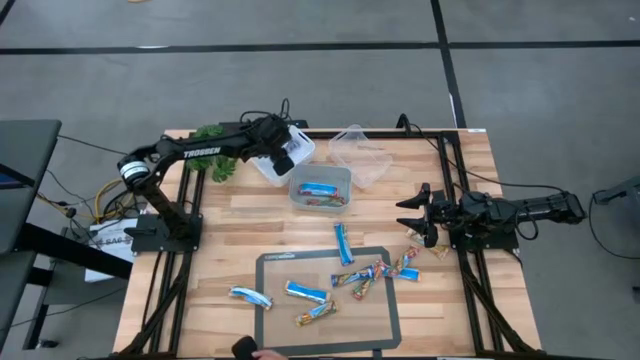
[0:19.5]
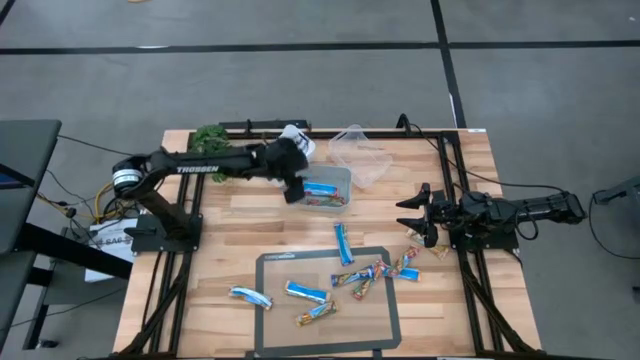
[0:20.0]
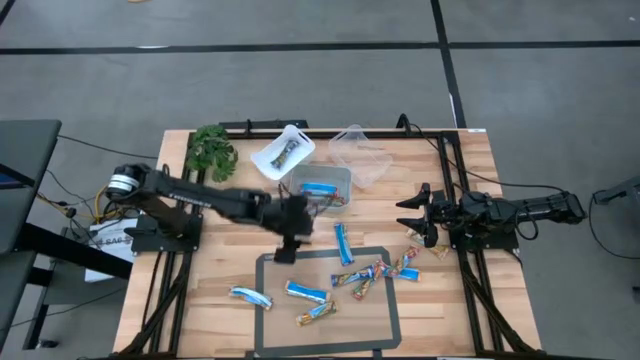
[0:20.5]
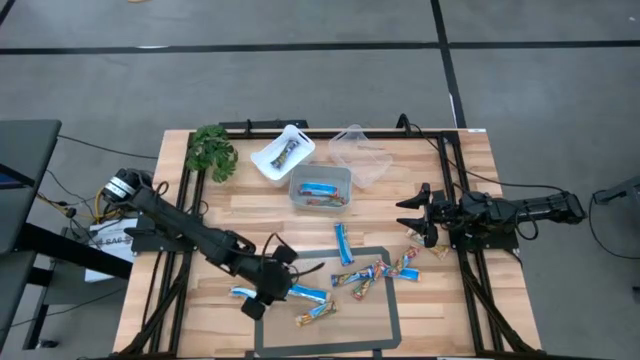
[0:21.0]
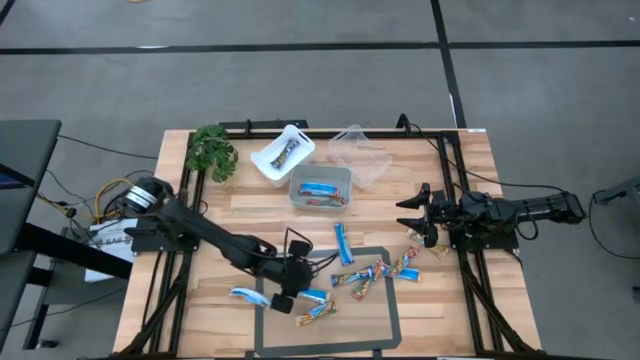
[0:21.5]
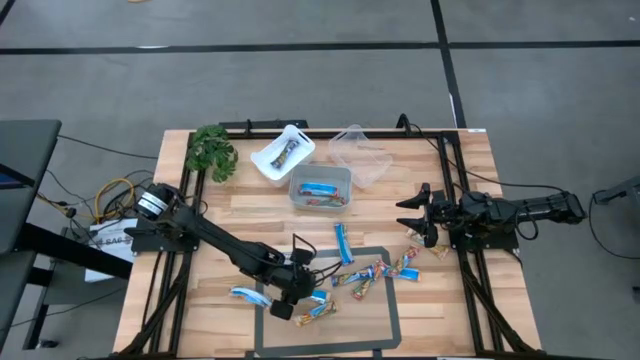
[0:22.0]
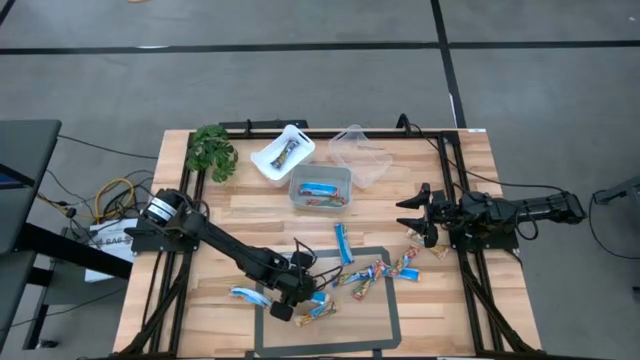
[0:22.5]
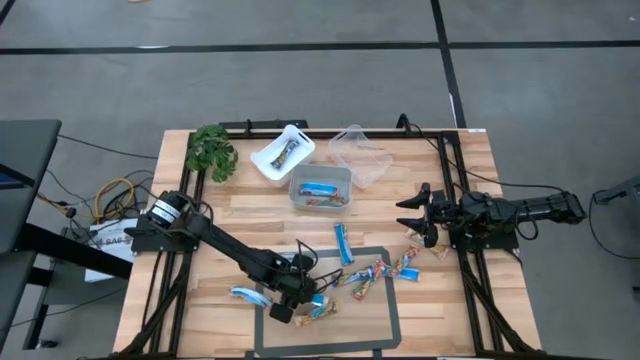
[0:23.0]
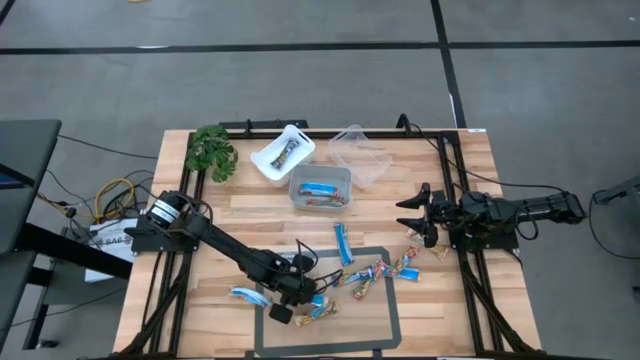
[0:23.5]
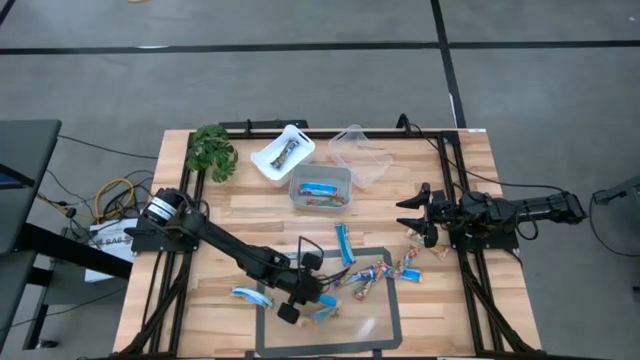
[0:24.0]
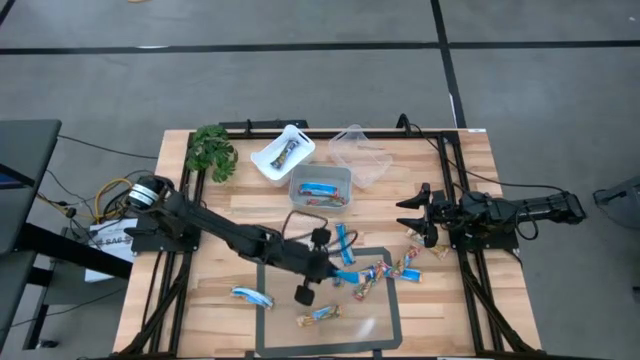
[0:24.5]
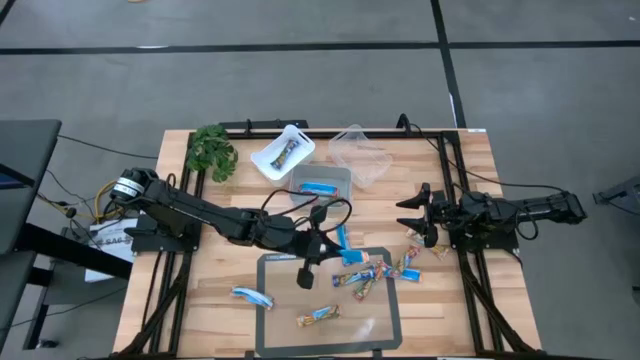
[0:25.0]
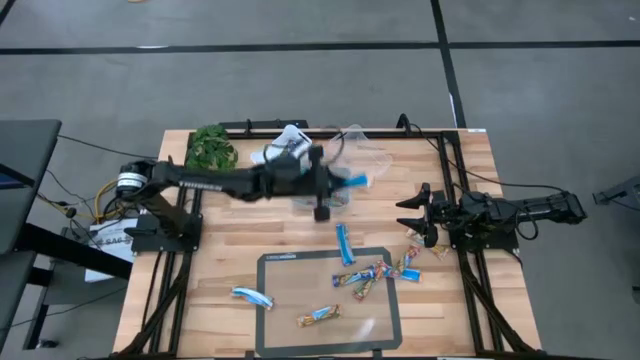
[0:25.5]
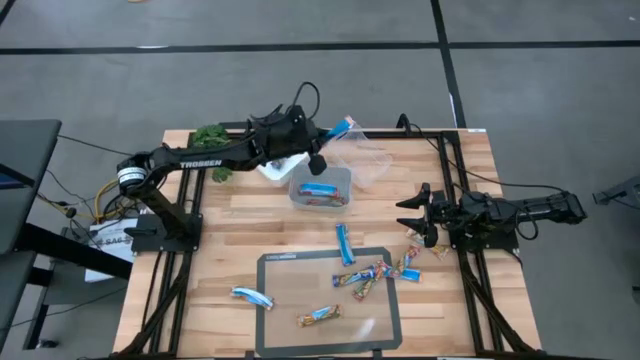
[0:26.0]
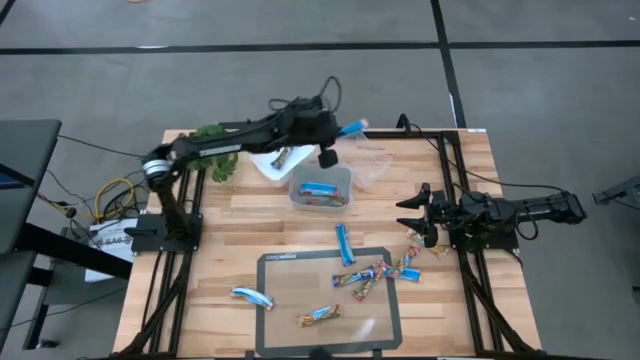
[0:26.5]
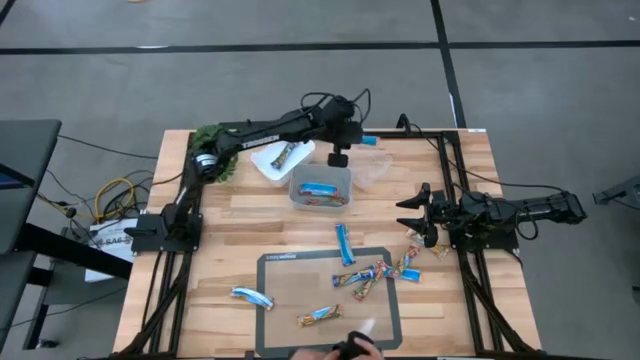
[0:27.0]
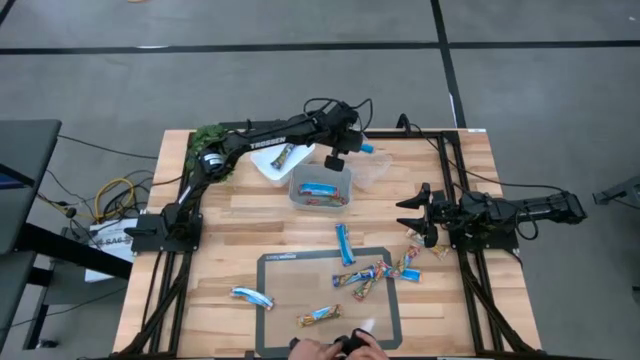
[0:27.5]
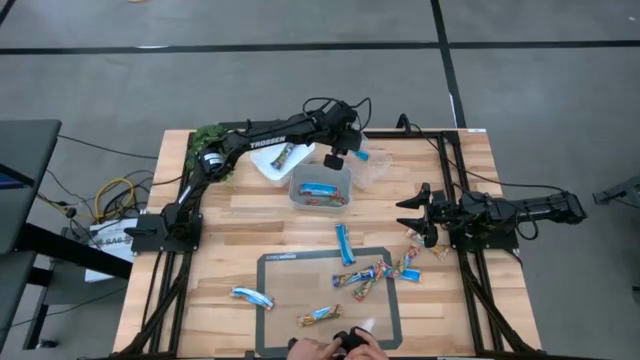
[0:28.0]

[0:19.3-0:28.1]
Task: Pick and place Granola Bars by type
Put the yellow granola bar into the transparent bin

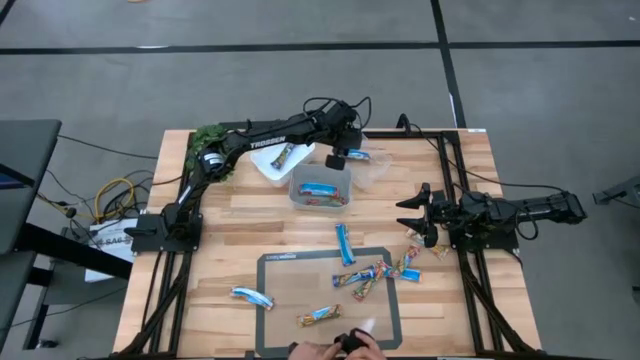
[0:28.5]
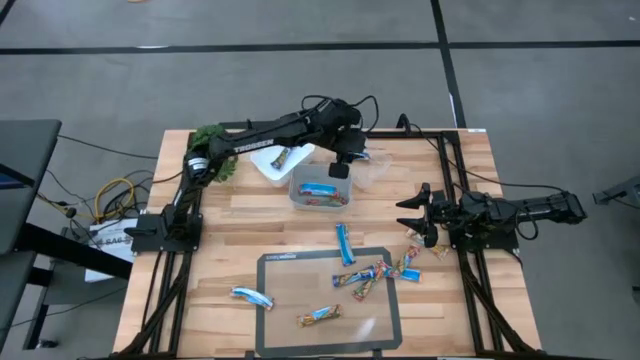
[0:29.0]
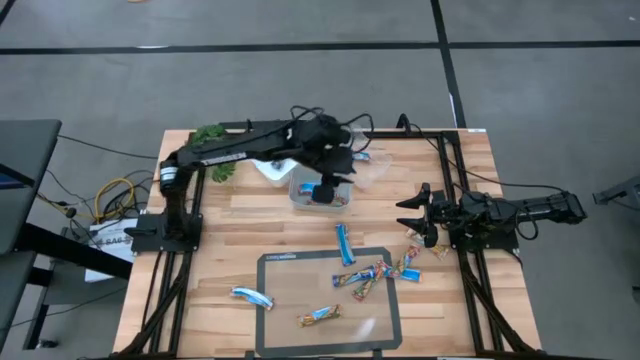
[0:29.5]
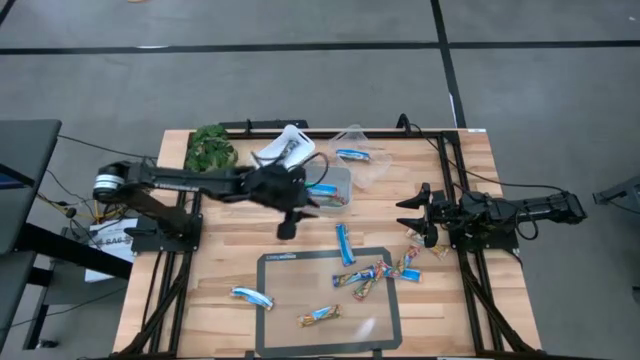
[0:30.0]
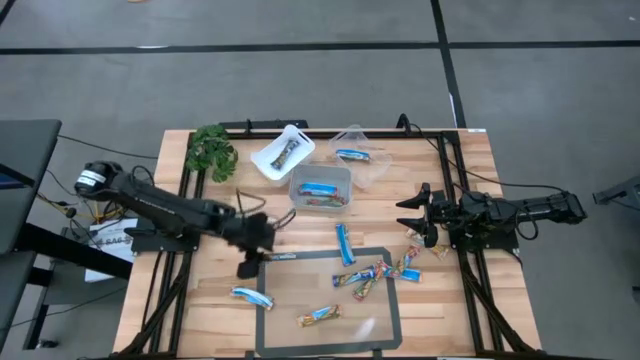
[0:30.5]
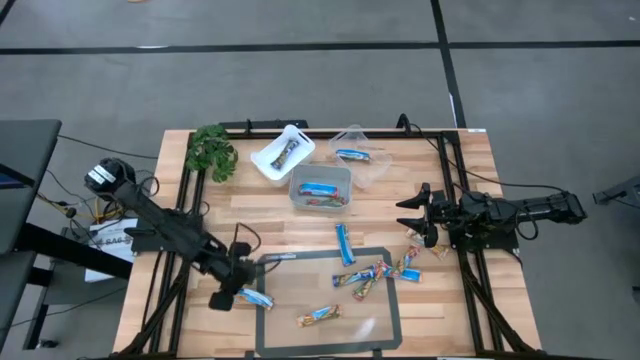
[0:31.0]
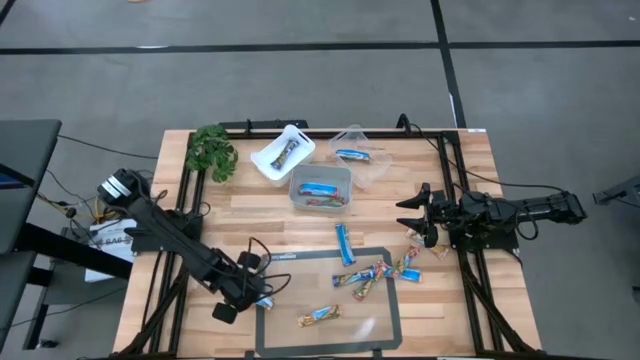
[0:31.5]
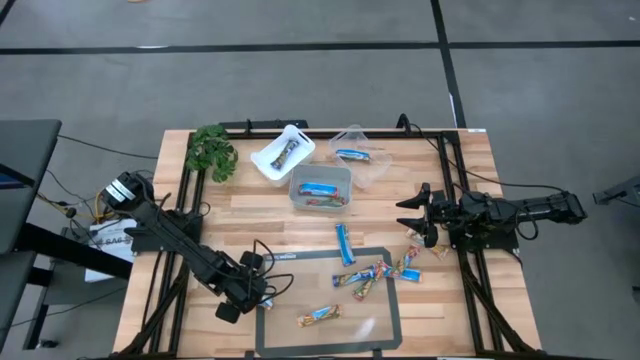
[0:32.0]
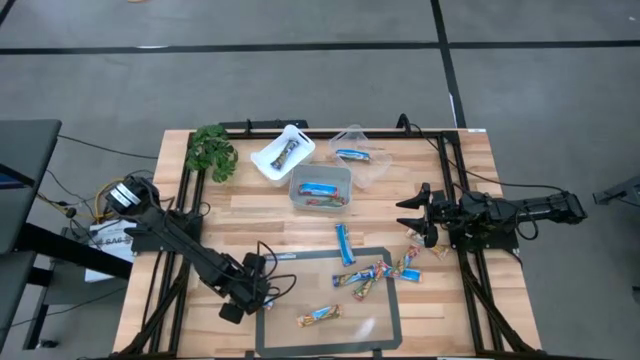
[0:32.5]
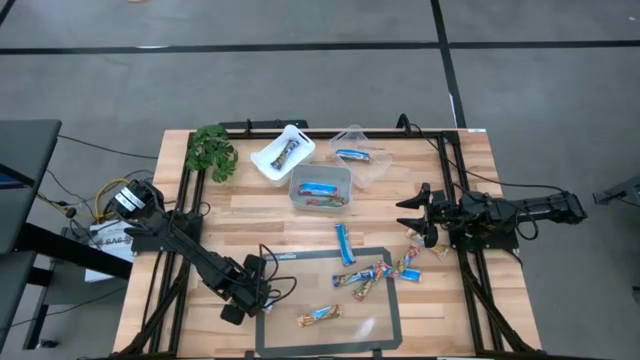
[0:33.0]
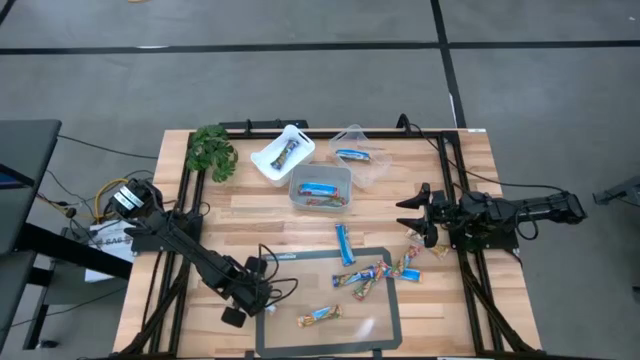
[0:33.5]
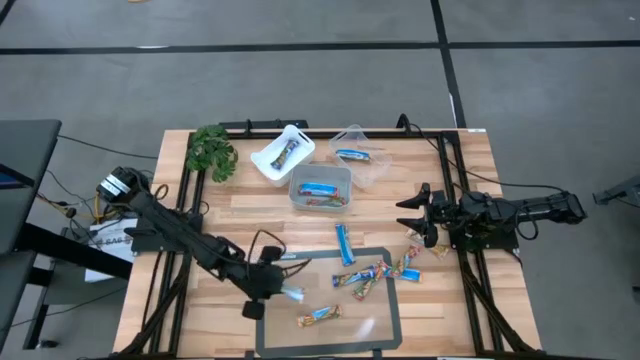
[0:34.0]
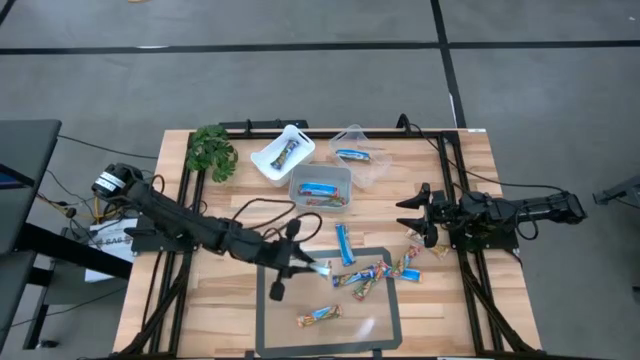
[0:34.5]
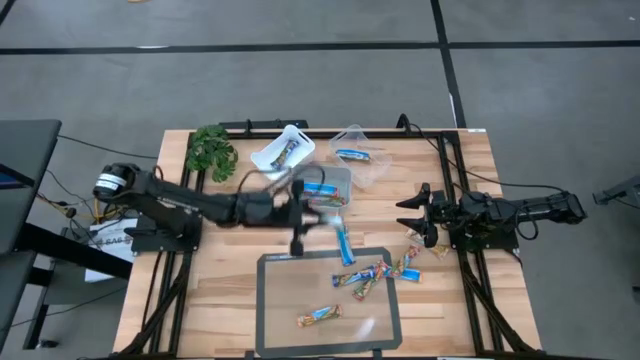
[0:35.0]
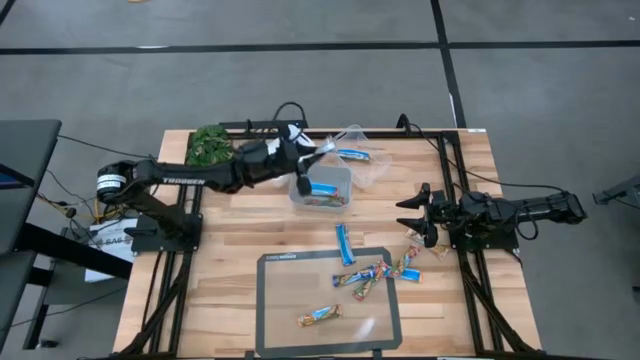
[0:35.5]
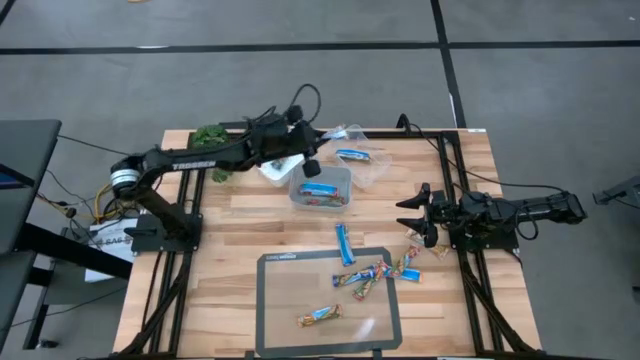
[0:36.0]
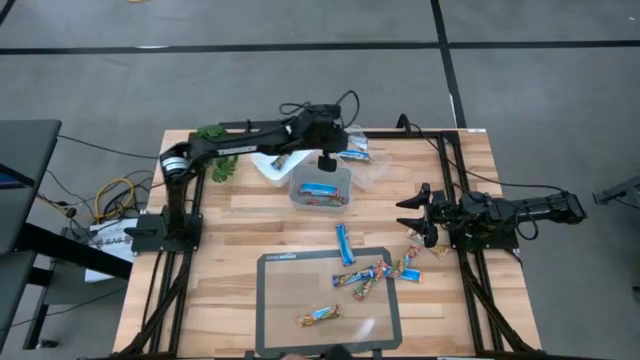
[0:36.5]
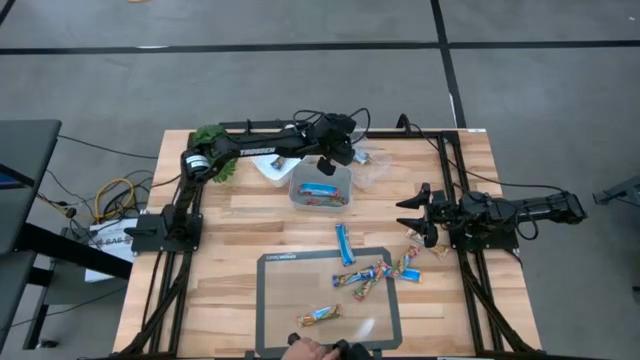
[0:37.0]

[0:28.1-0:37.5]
Put the yellow granola bar into the transparent bin

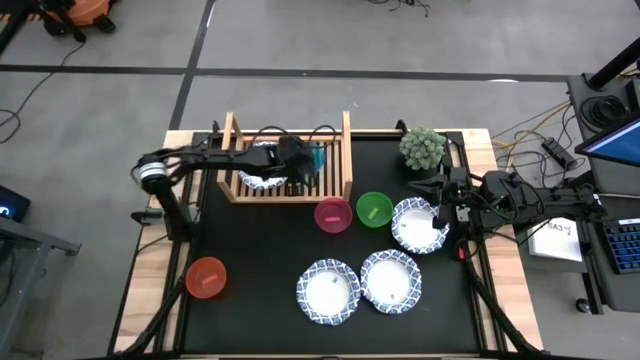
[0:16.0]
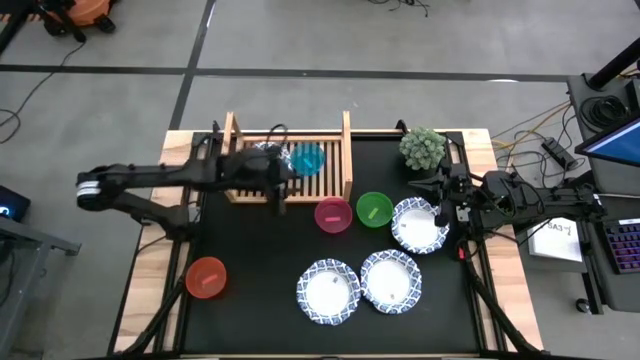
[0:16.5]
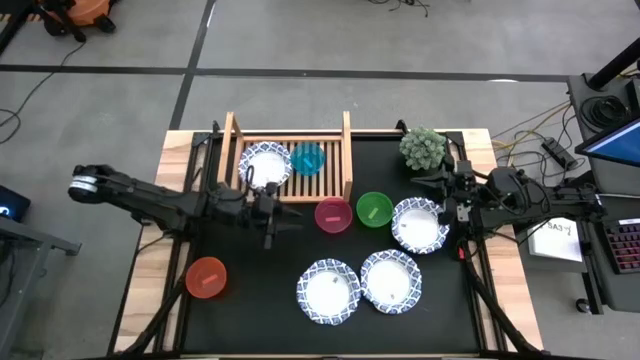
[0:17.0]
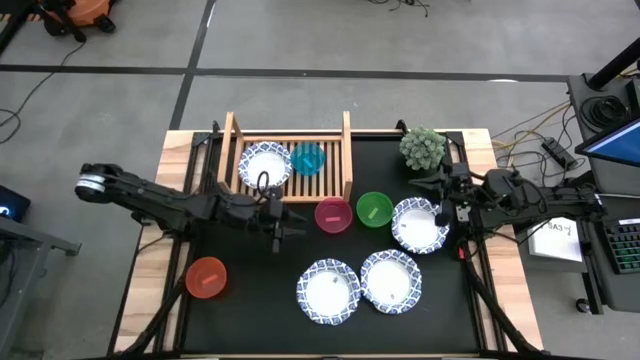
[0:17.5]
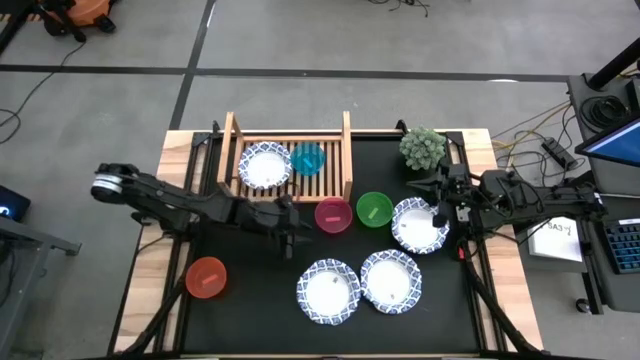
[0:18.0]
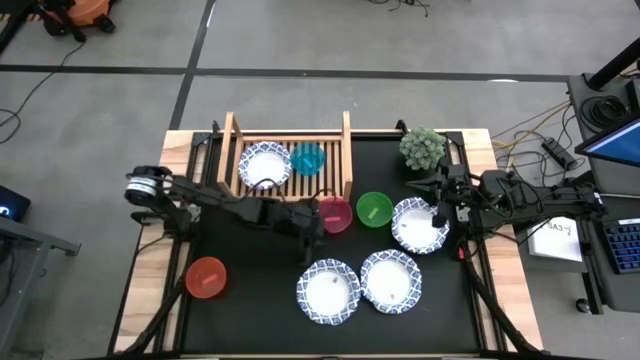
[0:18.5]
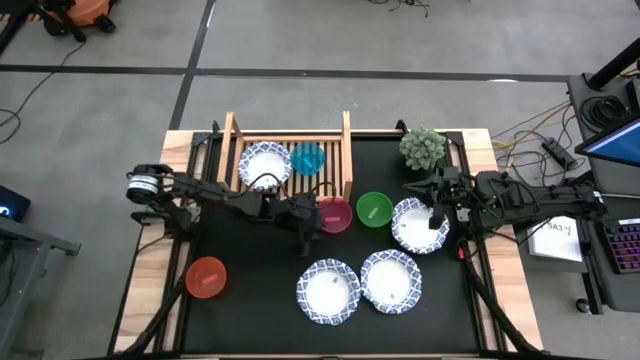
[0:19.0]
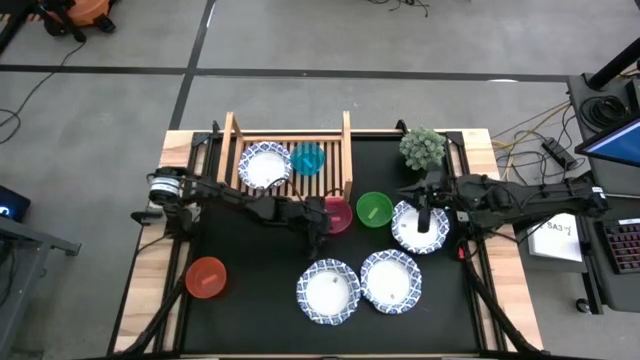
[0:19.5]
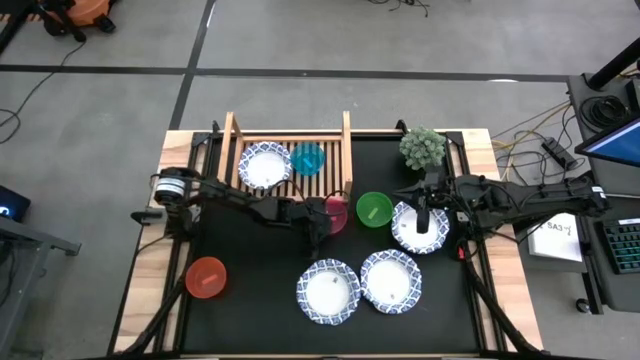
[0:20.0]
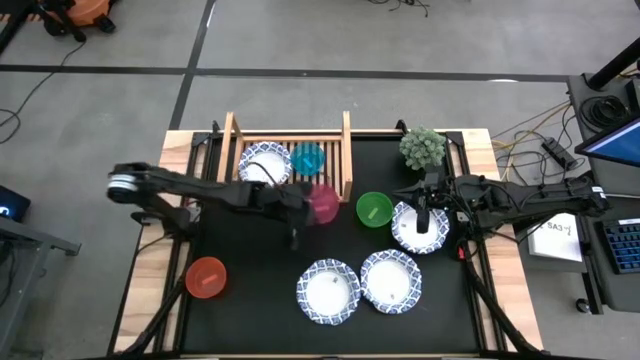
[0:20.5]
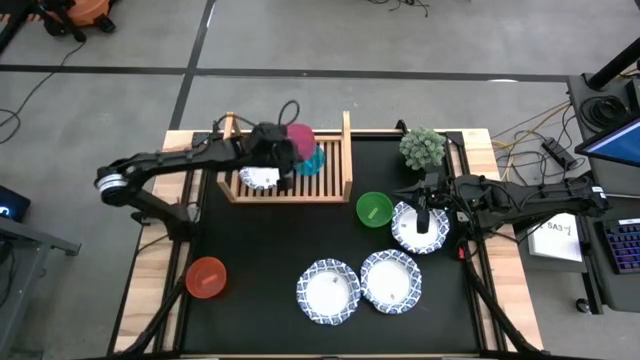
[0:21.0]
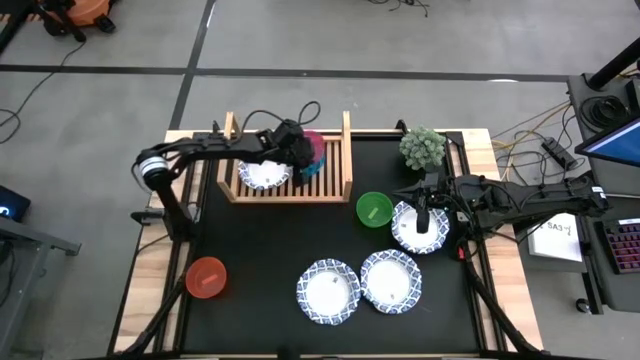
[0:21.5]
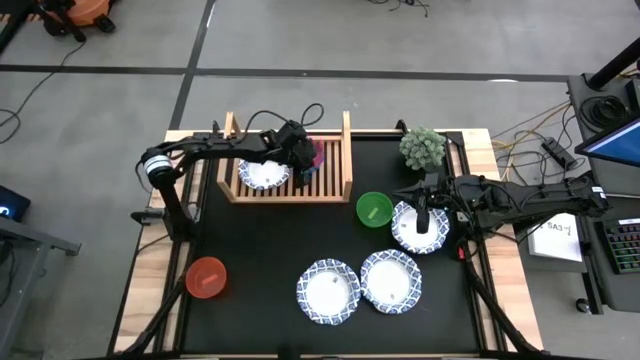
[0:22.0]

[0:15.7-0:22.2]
Task: Place and stack bowls onto a shelf
Stack the pink bowl on top of the blue bowl on the shelf
